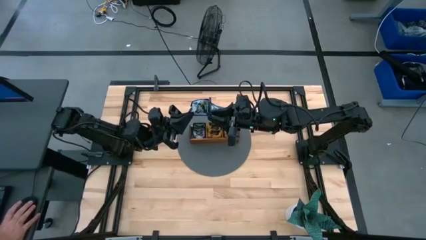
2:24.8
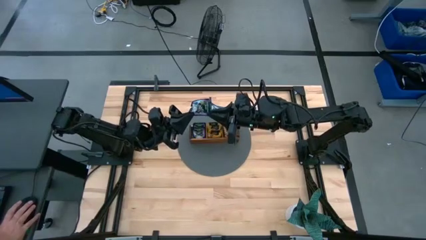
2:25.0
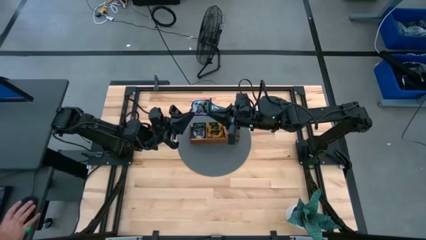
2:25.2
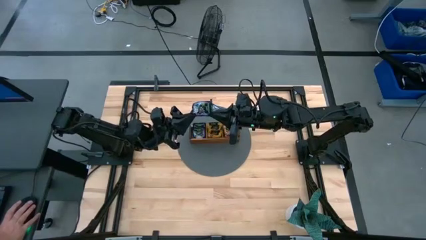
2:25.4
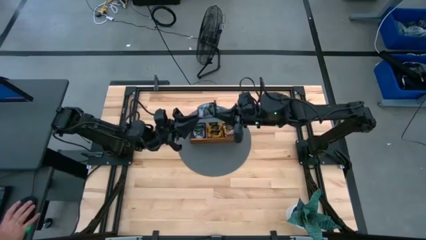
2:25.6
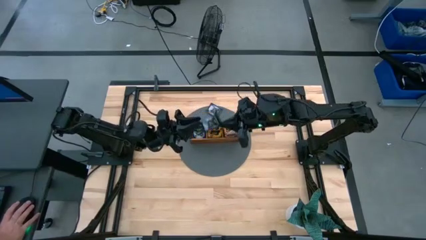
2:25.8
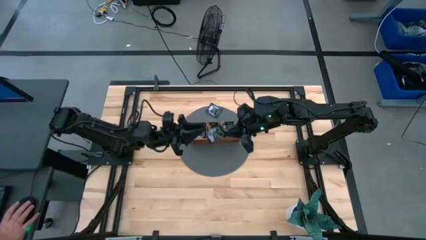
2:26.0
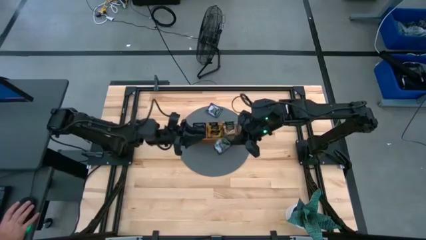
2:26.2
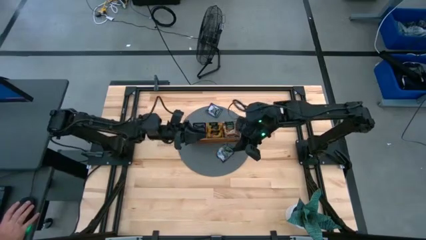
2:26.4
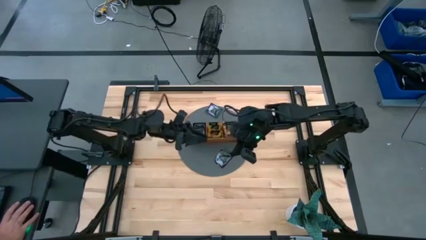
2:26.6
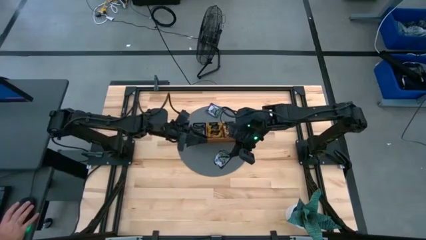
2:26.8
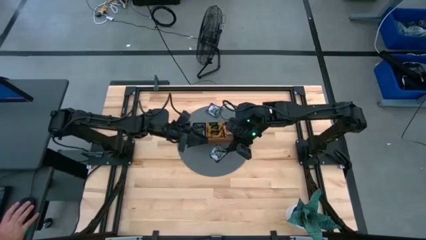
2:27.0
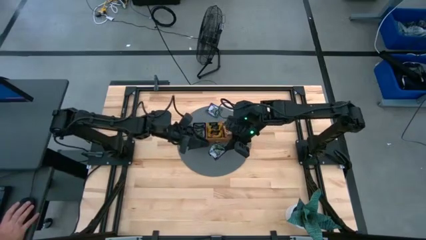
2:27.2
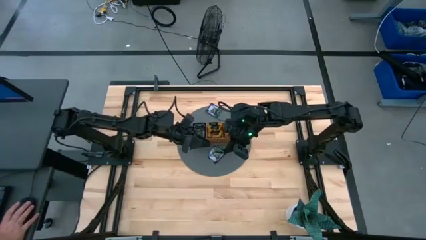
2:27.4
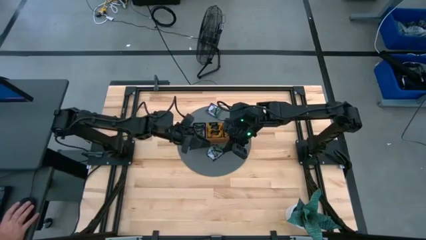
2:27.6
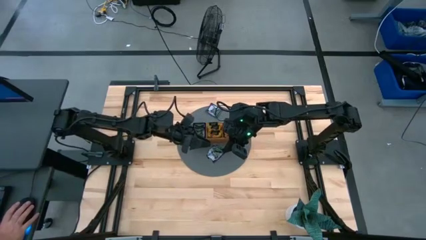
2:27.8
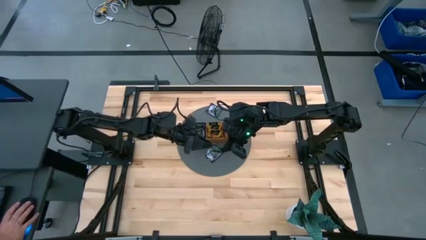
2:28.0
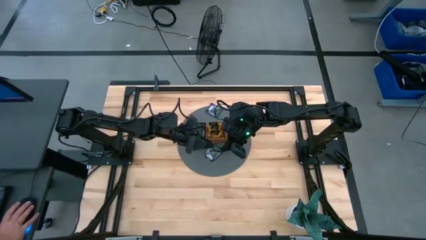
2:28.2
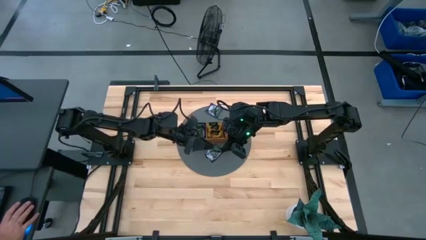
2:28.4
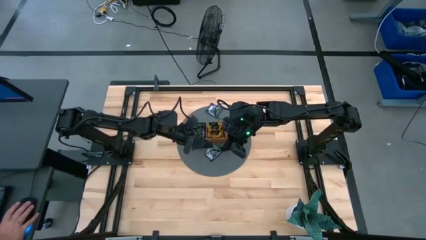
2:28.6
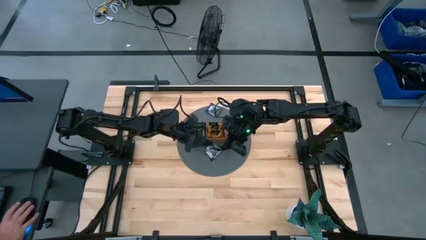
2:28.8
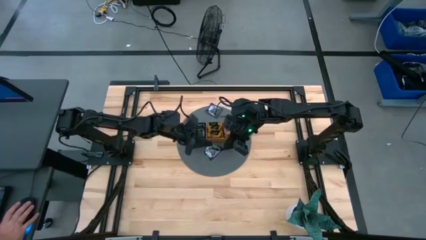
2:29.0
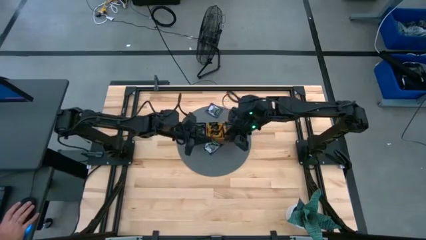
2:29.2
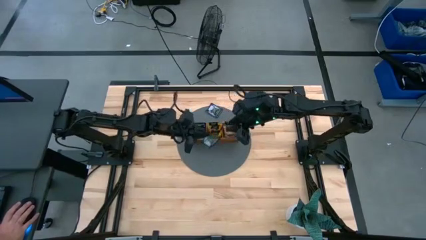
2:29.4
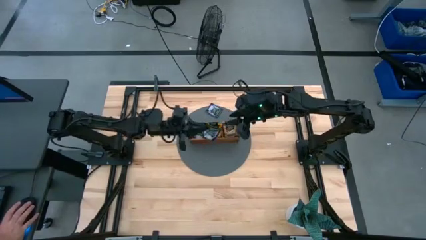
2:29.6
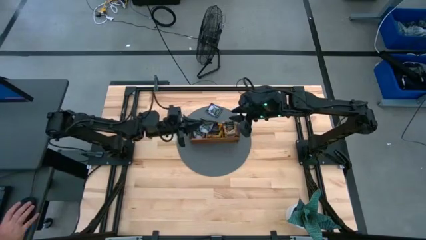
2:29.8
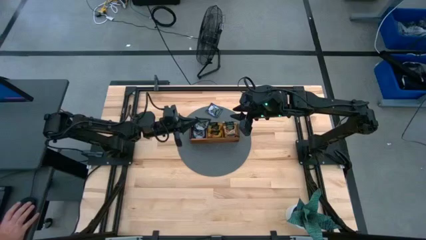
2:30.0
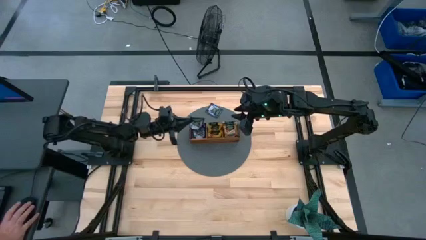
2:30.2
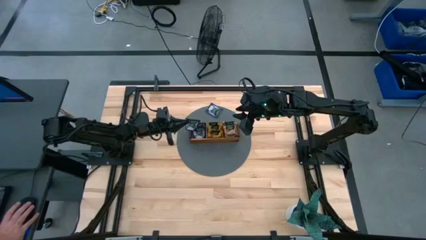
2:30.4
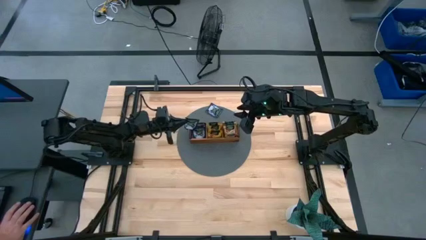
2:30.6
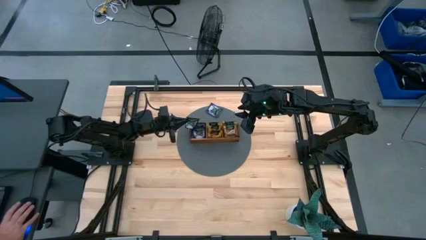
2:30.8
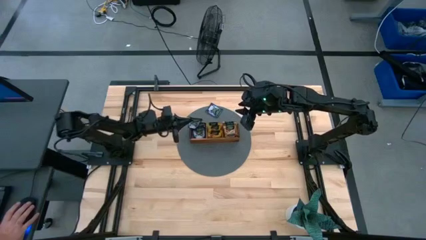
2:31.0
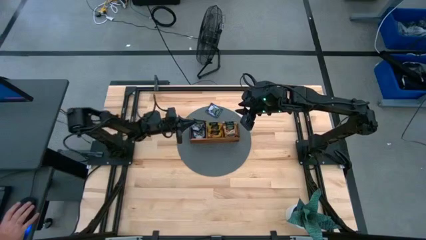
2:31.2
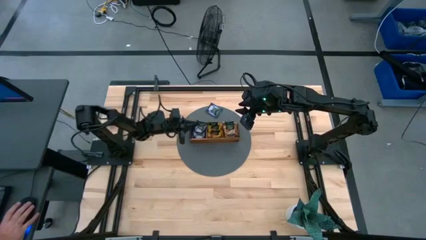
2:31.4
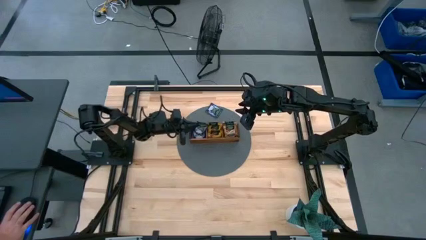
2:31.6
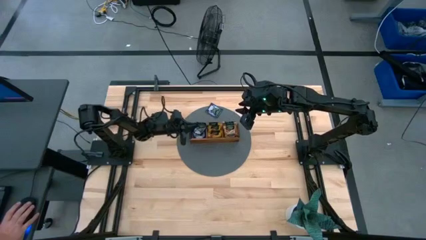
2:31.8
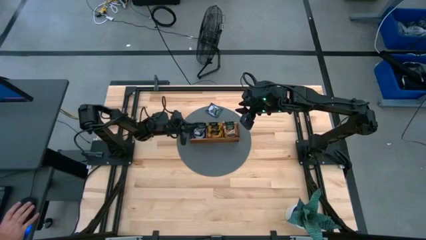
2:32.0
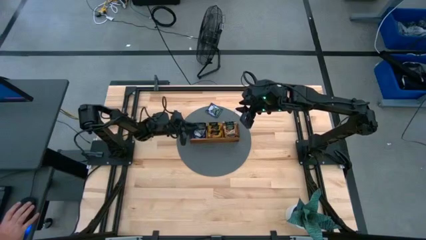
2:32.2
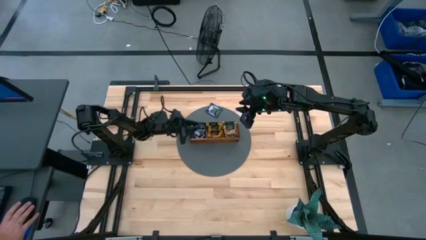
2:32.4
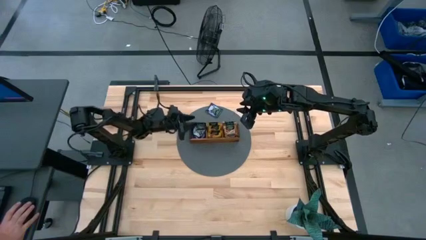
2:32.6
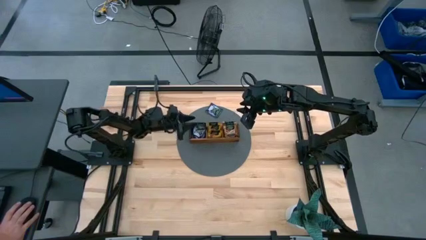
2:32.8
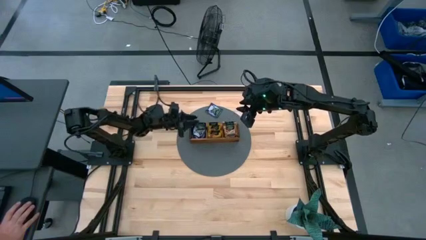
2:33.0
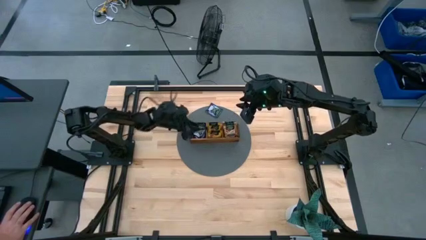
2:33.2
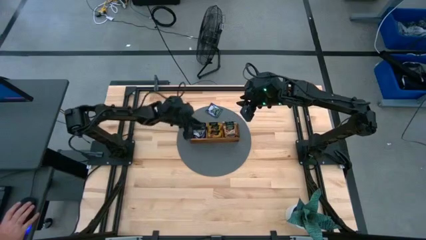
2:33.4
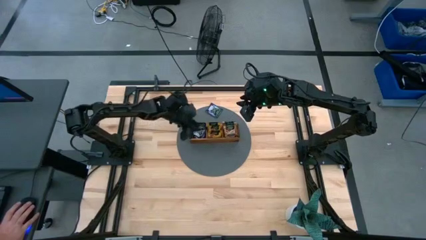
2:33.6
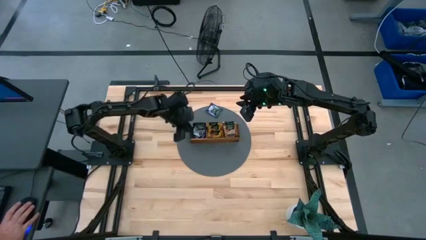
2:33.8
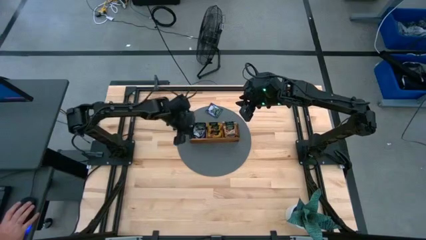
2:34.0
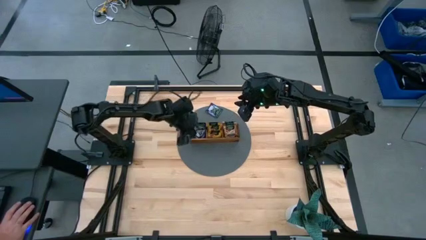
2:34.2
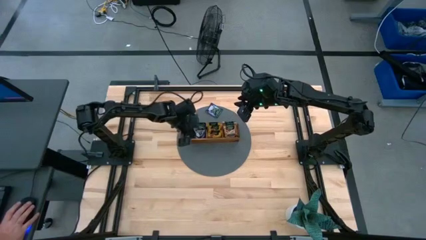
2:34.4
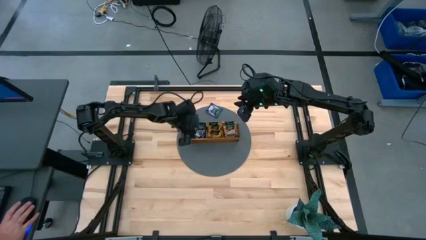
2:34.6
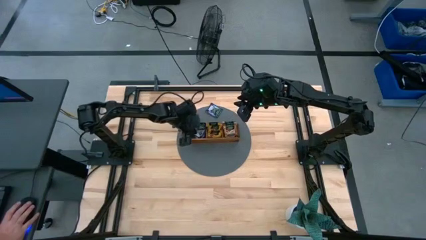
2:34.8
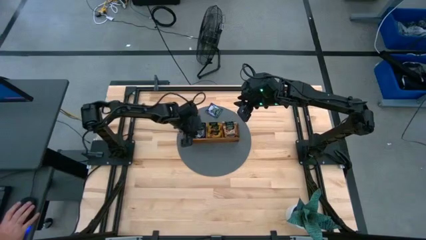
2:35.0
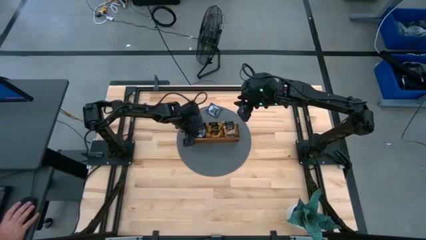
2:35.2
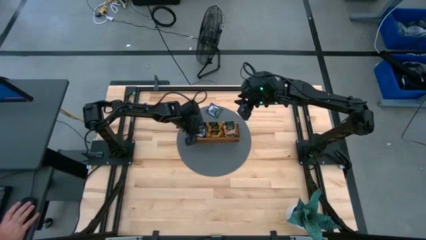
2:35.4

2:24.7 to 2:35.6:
Task: Pick & Place Tea
Put the violet tea bag into the left section of the wooden organizer
